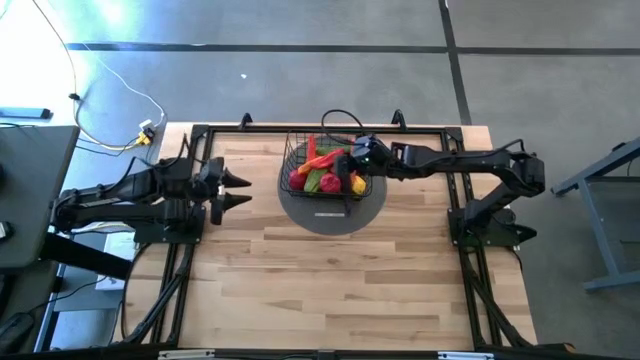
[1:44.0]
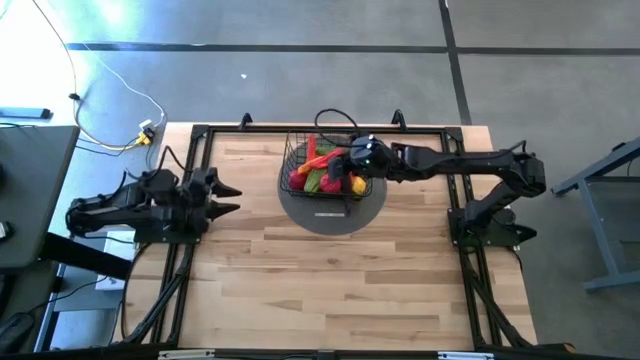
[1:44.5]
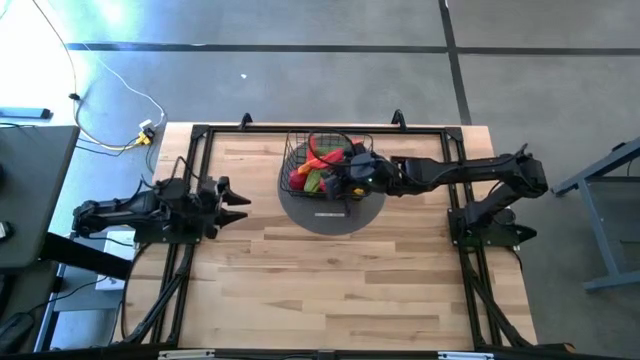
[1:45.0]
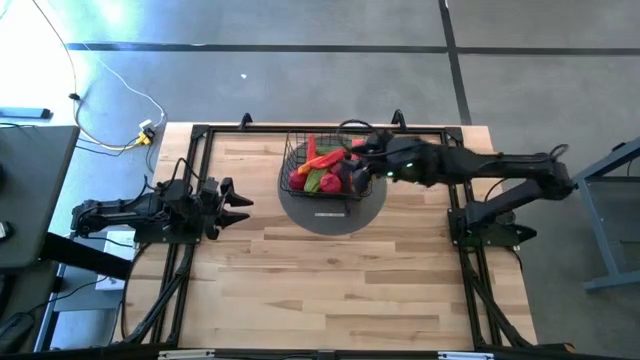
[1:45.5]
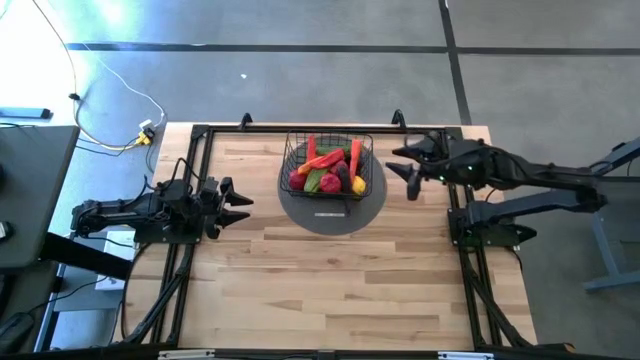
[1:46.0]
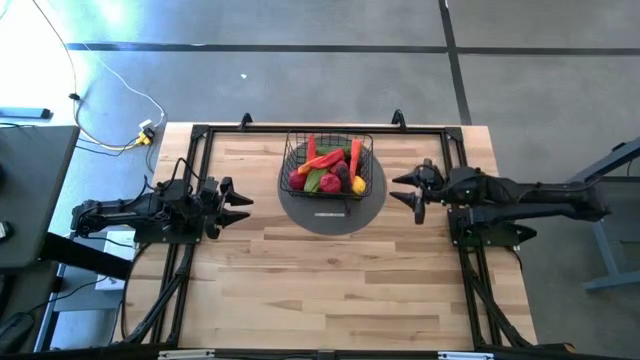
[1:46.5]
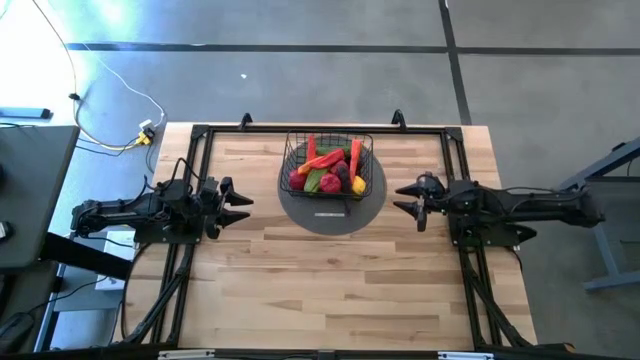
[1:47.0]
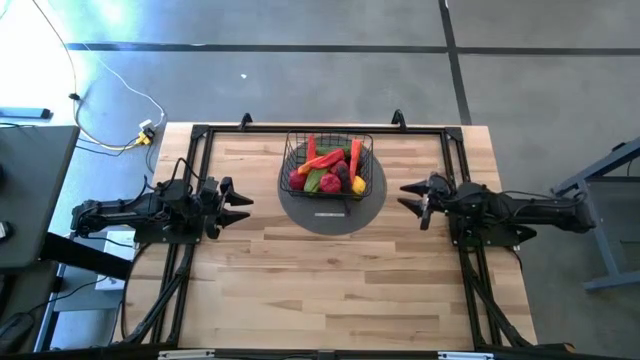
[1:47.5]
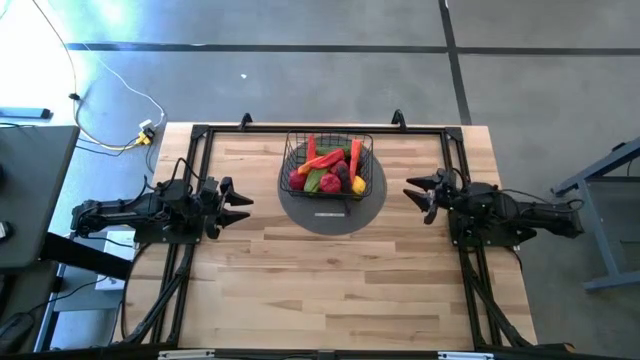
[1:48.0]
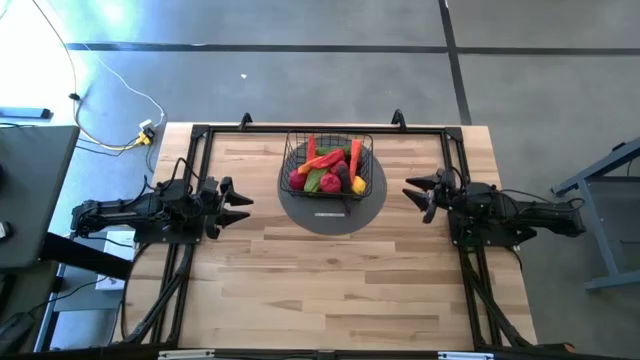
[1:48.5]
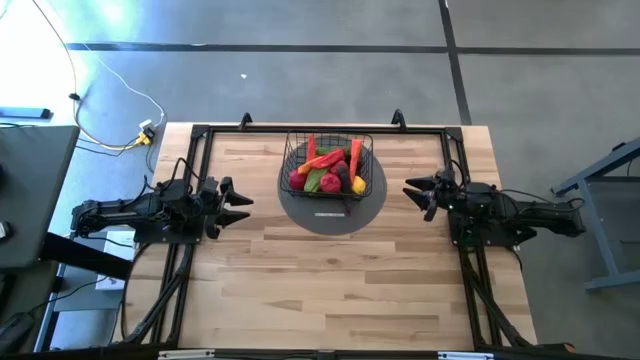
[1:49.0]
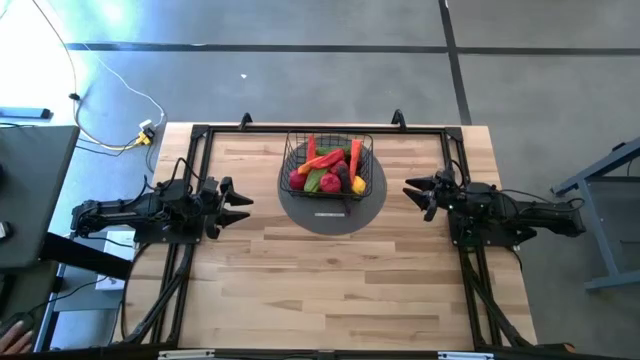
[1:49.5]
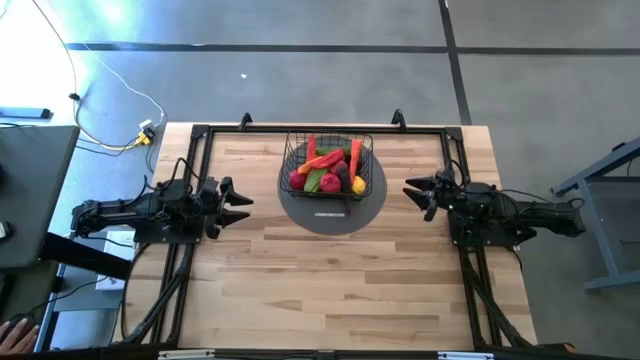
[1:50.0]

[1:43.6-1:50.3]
Task: Build produce basket
Return to Home Position

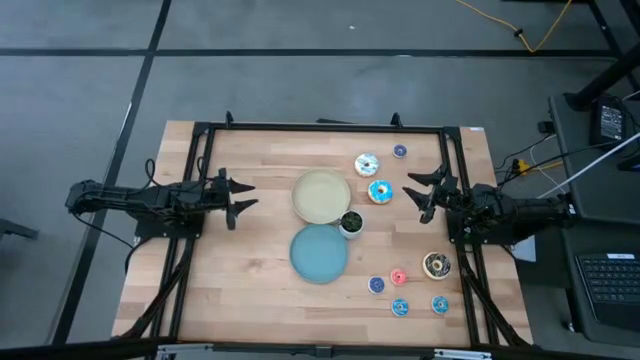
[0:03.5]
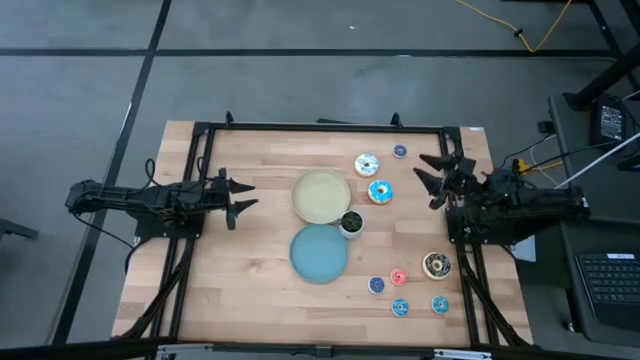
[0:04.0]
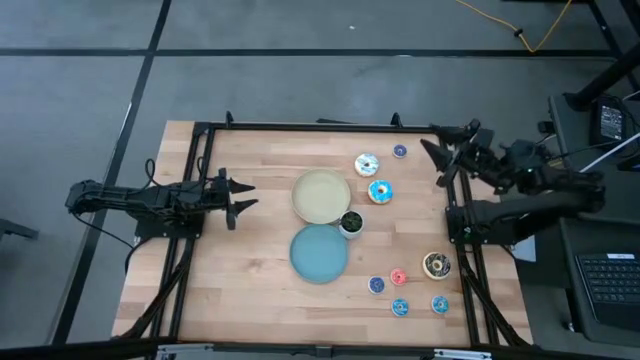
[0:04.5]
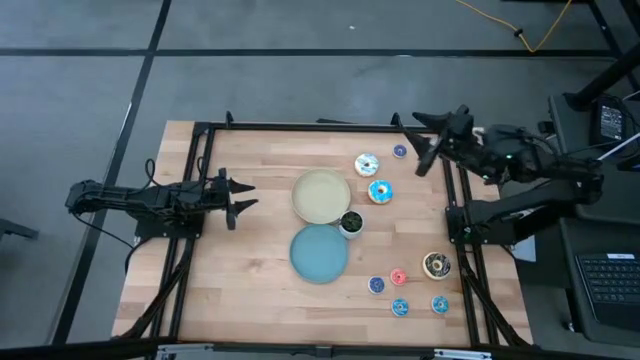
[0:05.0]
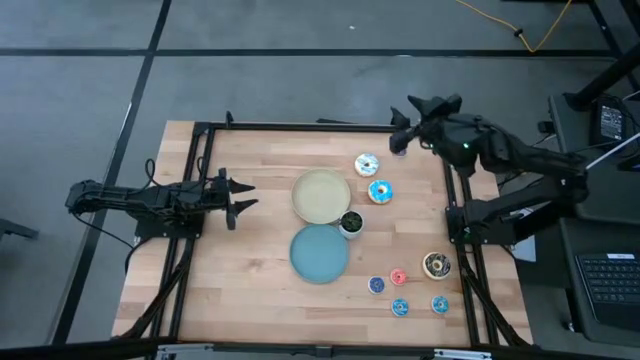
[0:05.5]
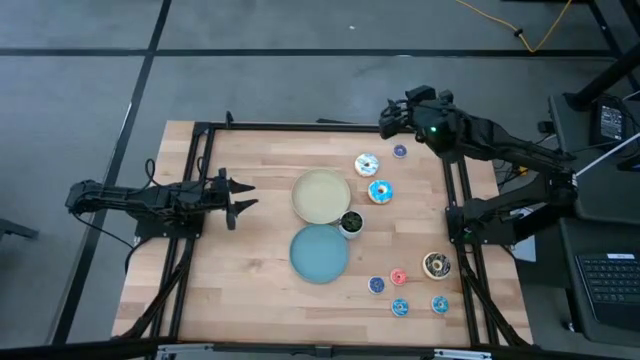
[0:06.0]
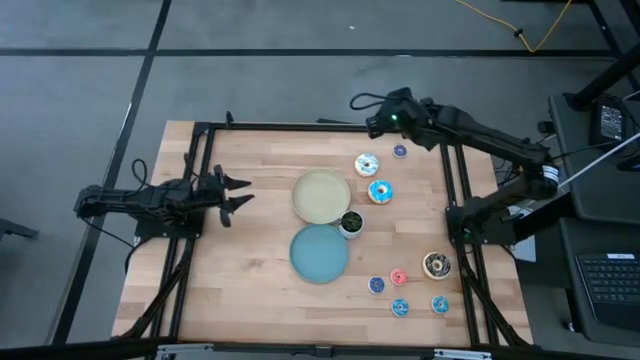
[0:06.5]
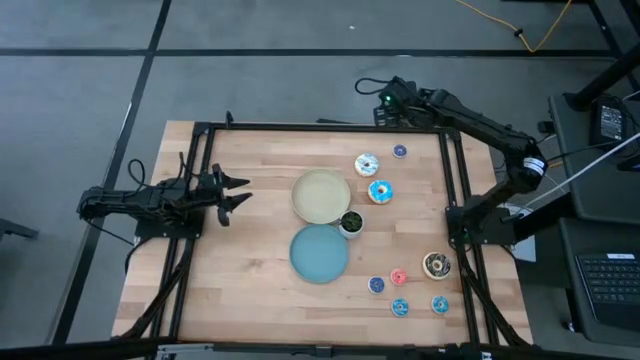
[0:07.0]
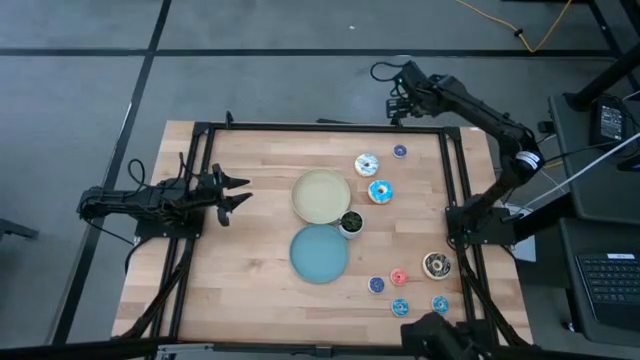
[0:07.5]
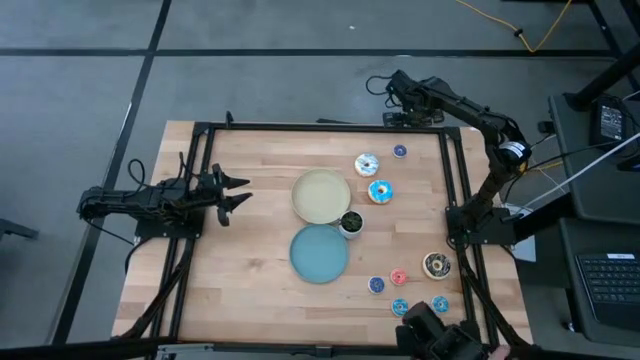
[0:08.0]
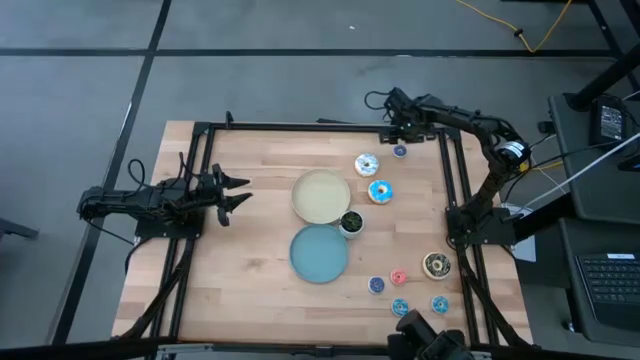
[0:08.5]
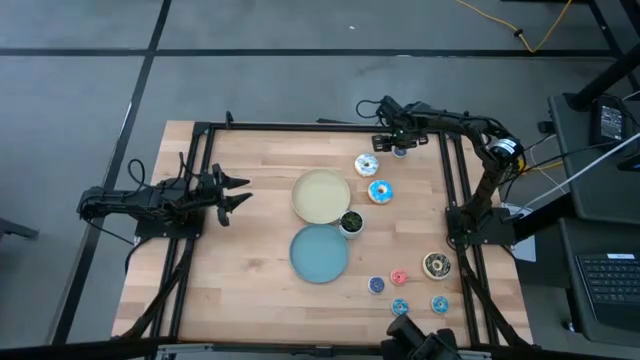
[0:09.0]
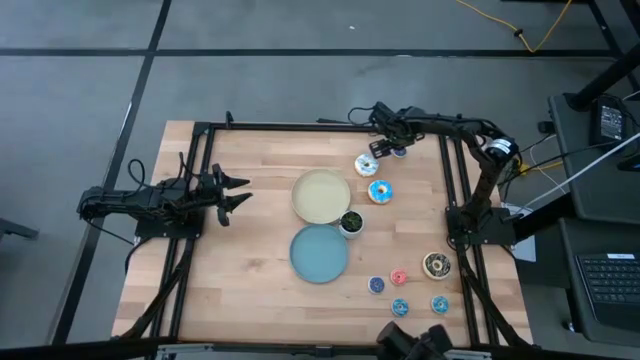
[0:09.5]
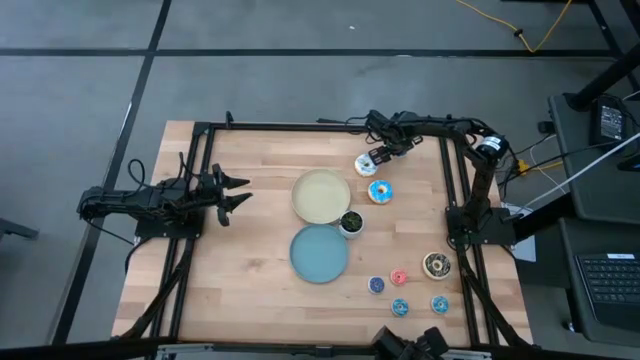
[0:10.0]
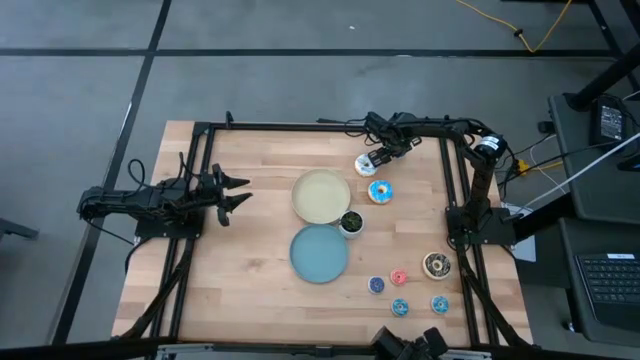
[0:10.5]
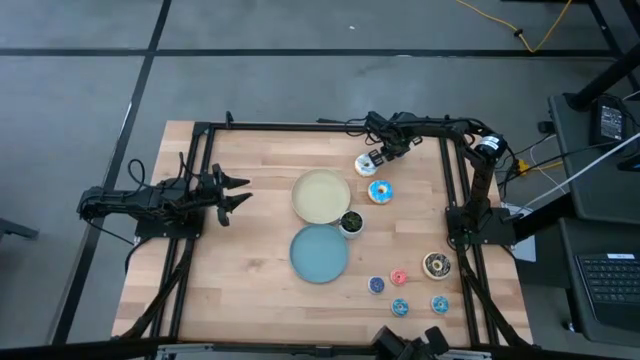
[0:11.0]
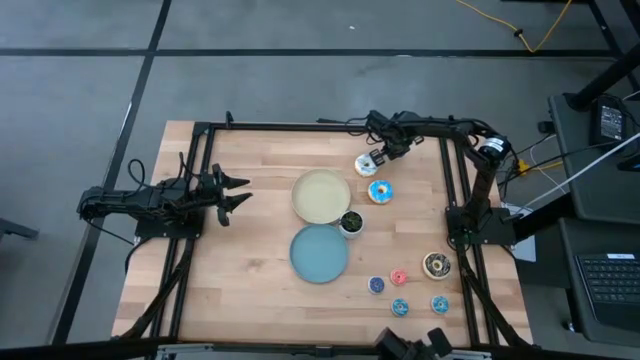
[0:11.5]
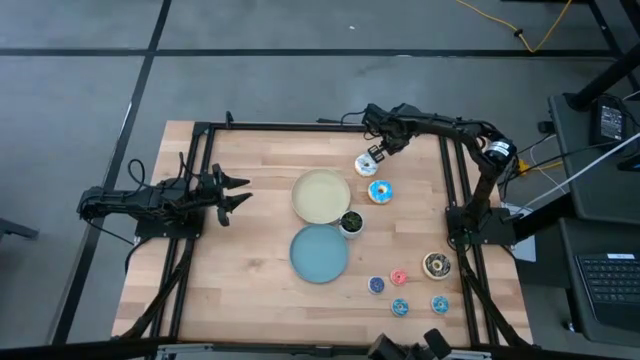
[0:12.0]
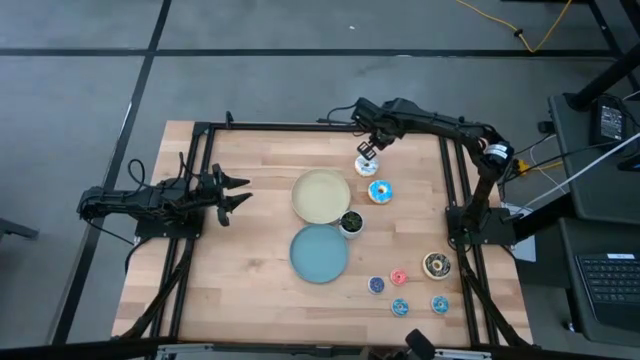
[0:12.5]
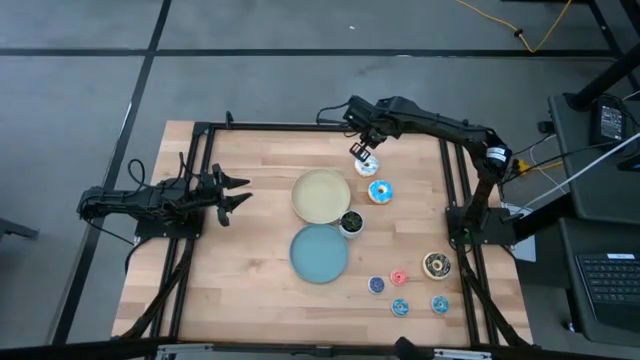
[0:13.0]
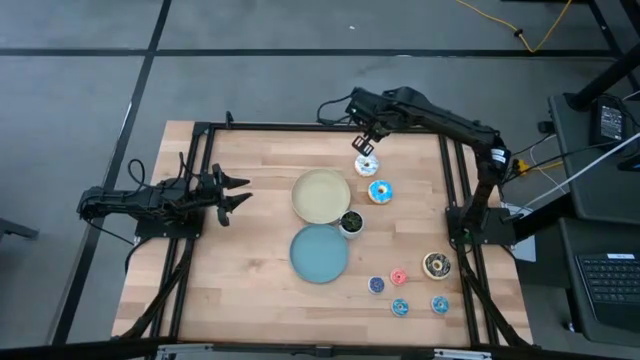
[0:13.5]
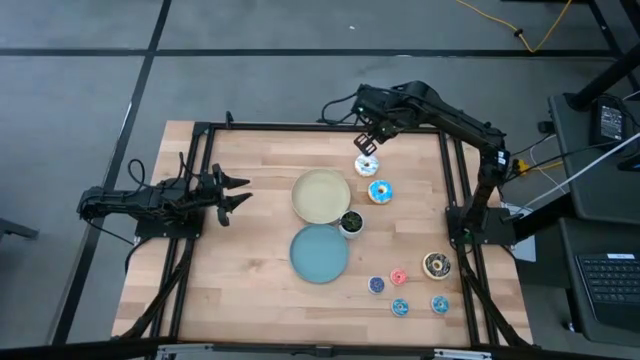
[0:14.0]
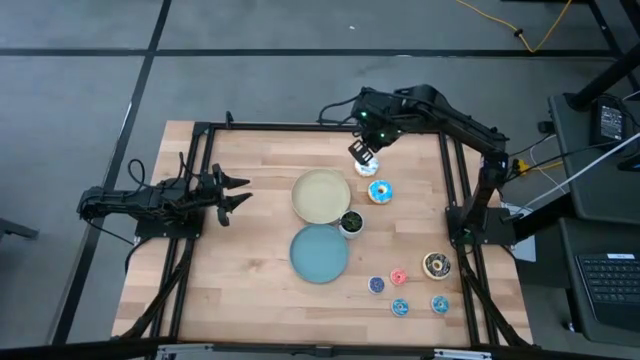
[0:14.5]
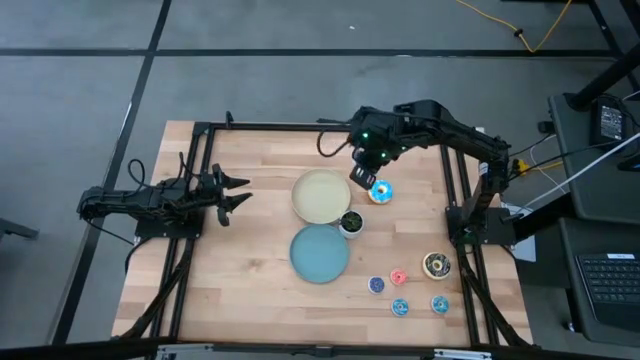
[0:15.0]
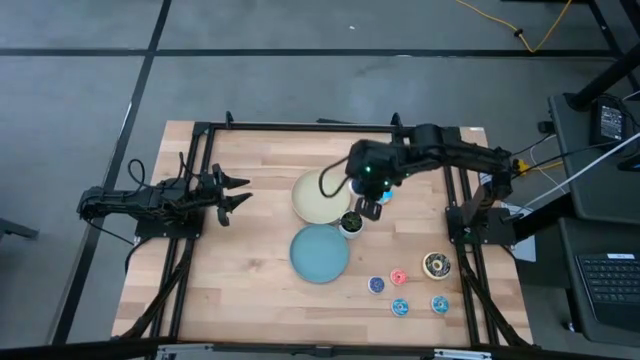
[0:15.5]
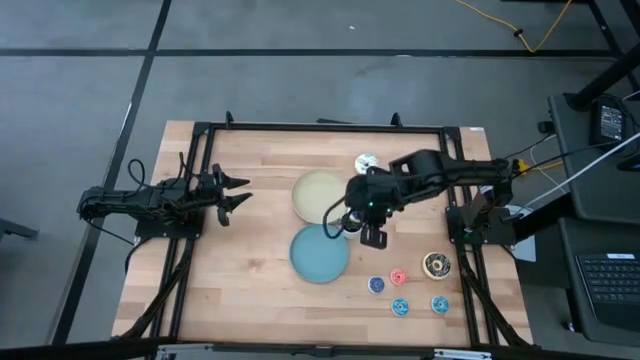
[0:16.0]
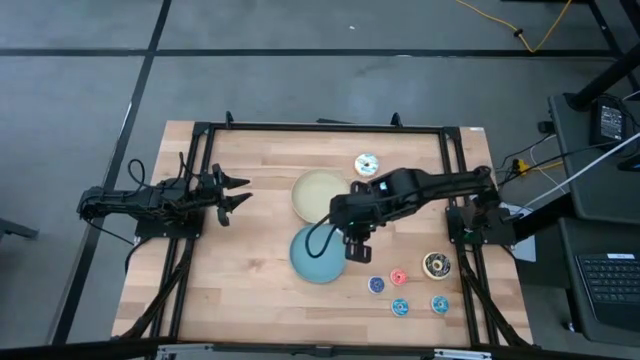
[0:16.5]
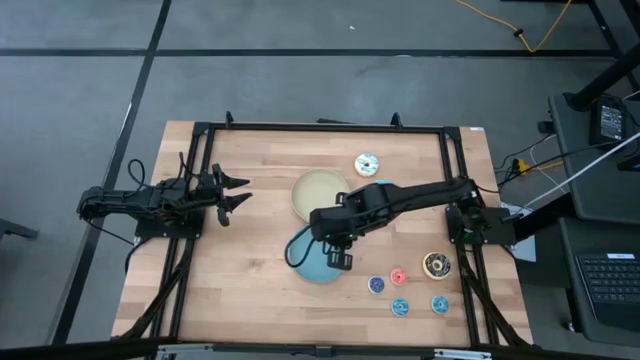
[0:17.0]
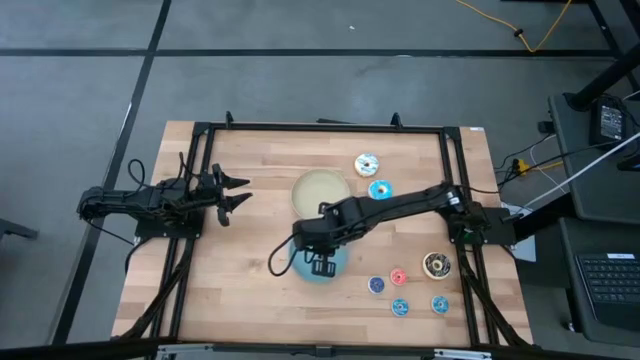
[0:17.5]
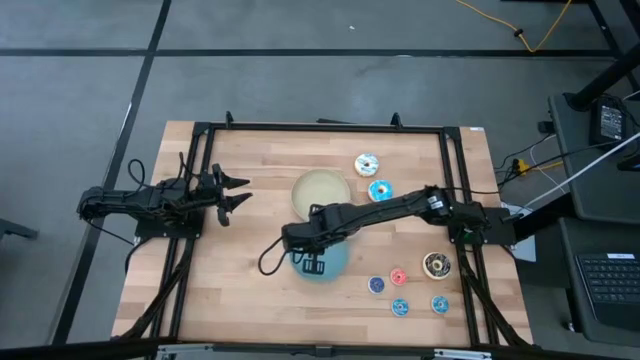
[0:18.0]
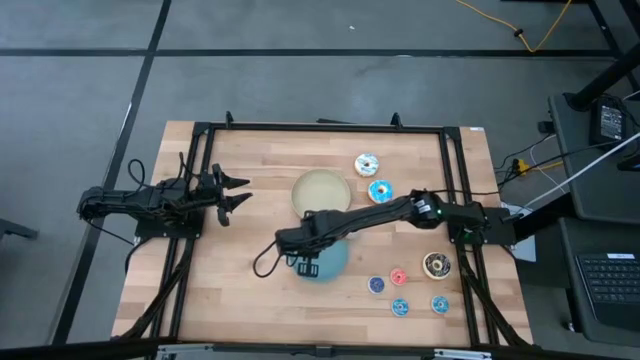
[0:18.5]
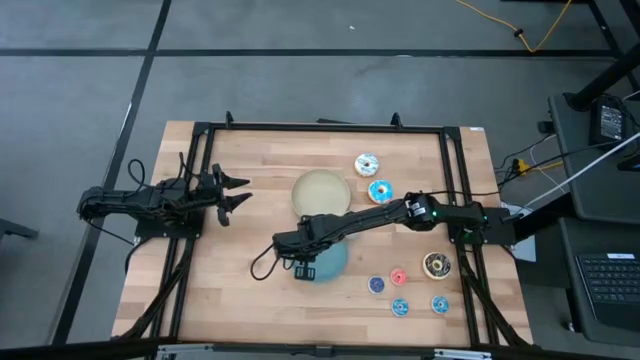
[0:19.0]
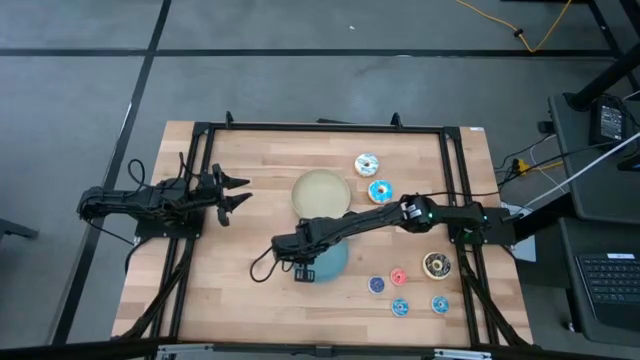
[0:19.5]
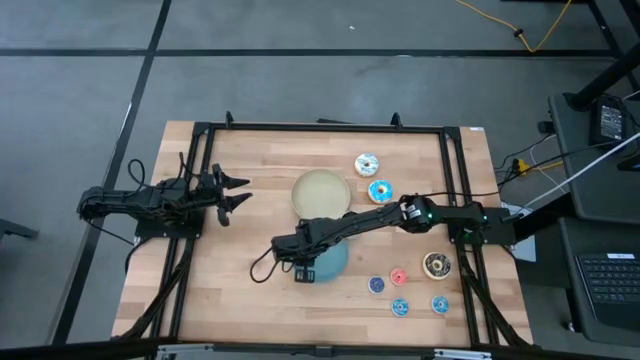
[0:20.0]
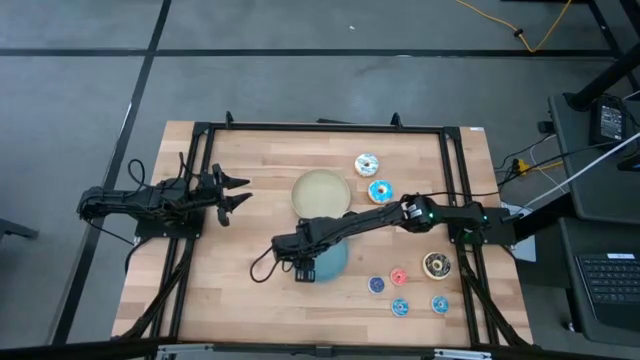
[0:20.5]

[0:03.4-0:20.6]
Task: Pick & Place donuts
Put the small dark blue donut on the blue plate
